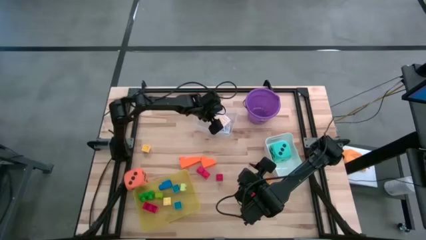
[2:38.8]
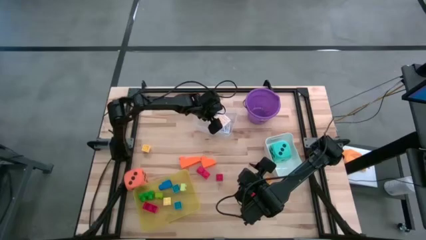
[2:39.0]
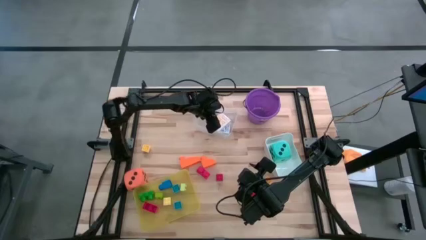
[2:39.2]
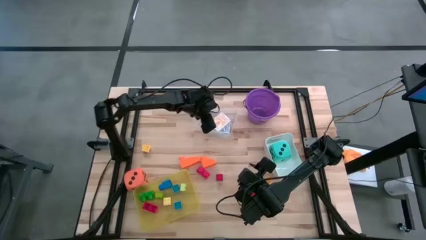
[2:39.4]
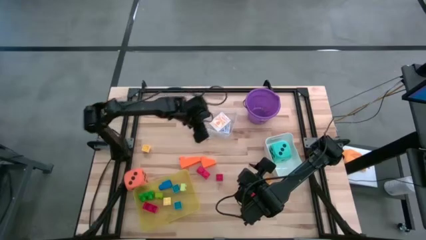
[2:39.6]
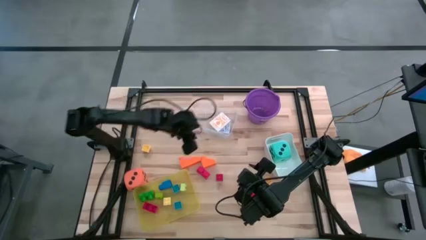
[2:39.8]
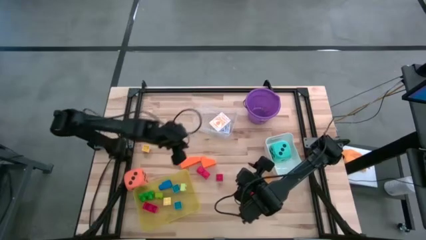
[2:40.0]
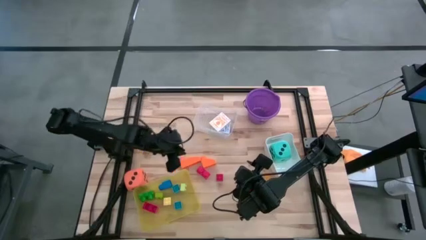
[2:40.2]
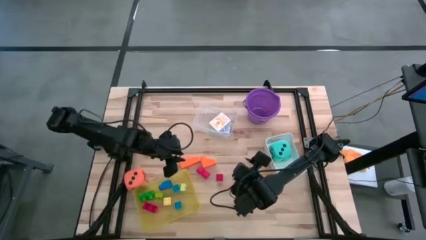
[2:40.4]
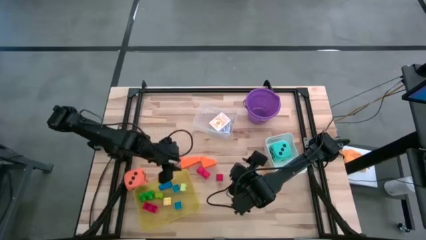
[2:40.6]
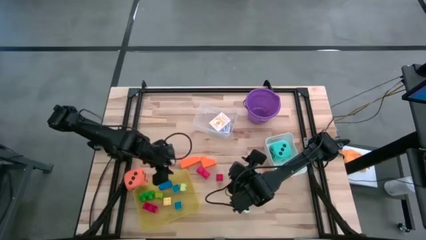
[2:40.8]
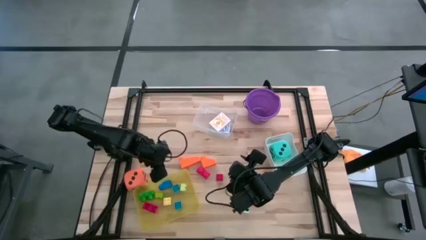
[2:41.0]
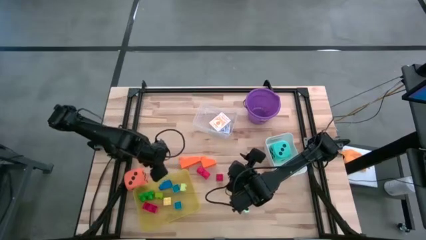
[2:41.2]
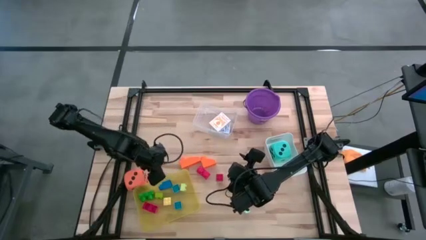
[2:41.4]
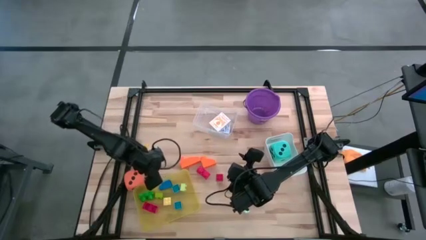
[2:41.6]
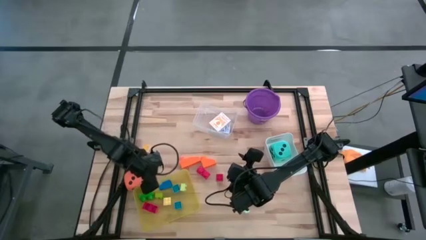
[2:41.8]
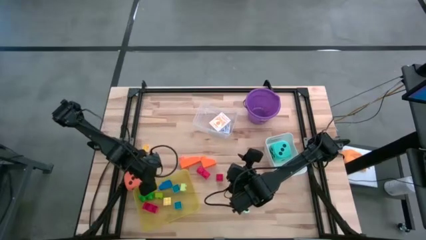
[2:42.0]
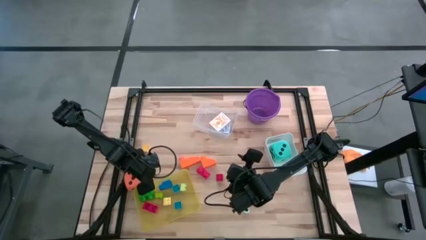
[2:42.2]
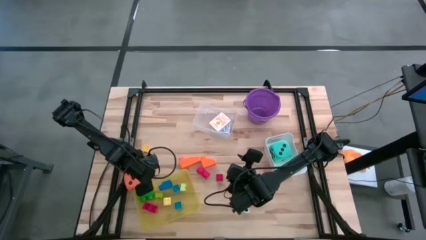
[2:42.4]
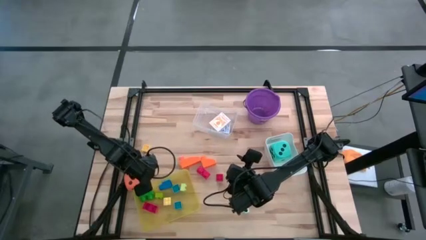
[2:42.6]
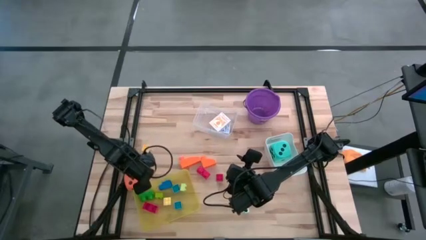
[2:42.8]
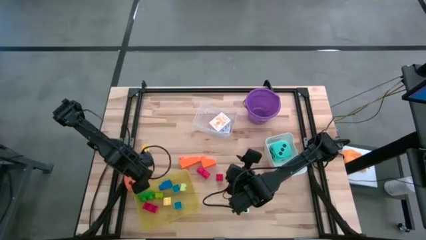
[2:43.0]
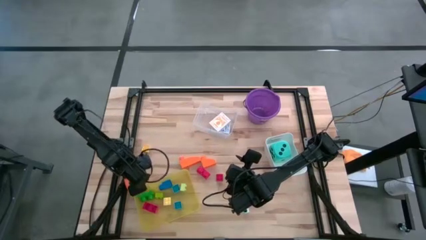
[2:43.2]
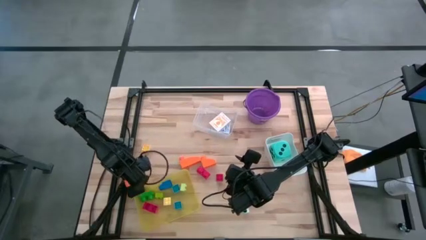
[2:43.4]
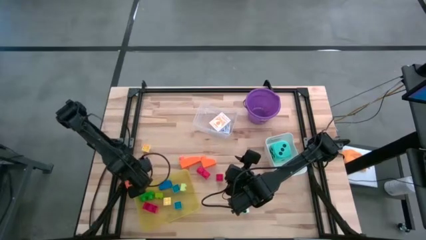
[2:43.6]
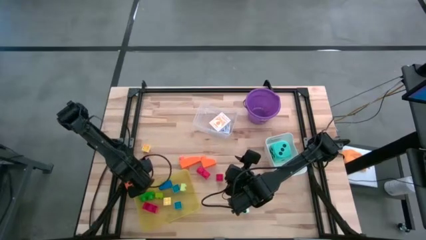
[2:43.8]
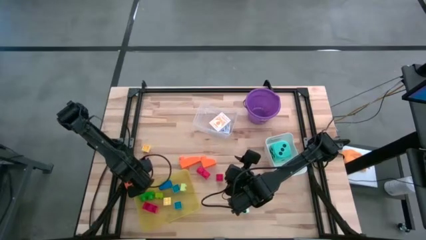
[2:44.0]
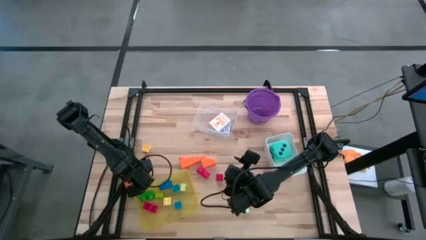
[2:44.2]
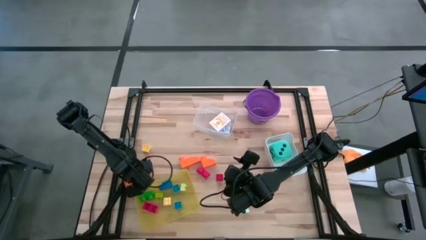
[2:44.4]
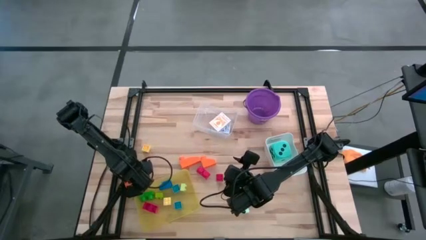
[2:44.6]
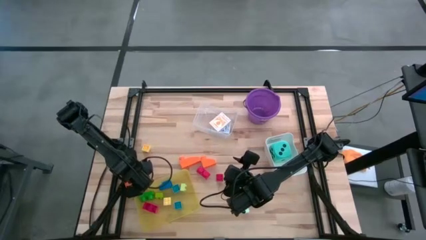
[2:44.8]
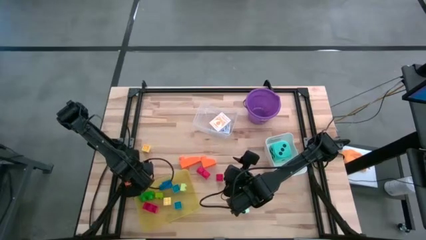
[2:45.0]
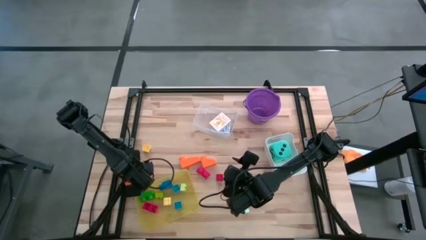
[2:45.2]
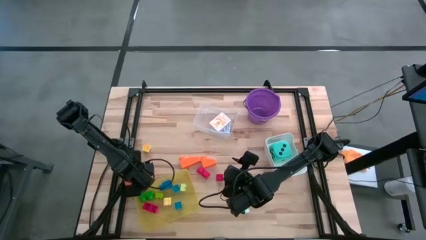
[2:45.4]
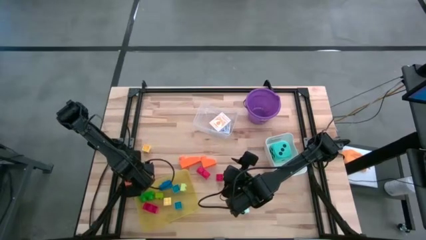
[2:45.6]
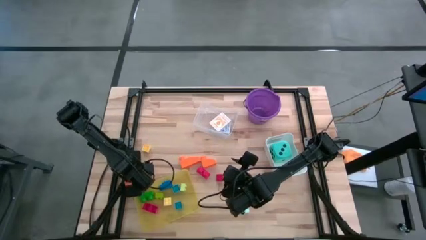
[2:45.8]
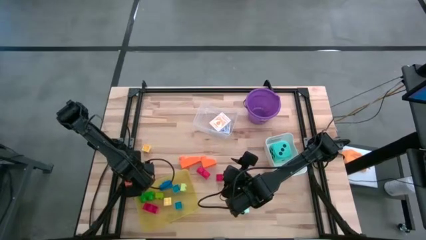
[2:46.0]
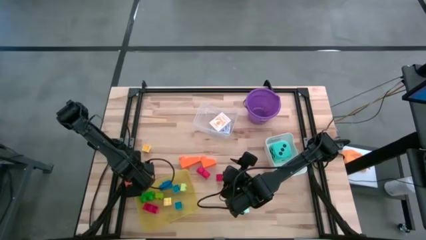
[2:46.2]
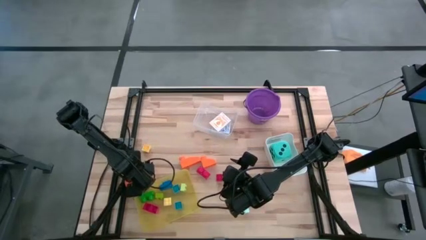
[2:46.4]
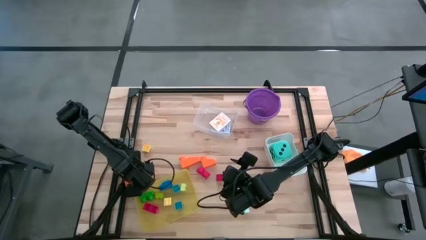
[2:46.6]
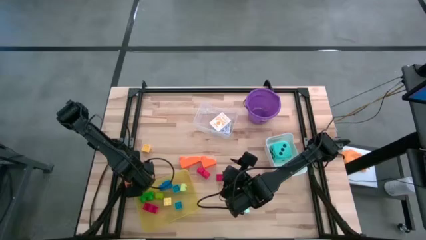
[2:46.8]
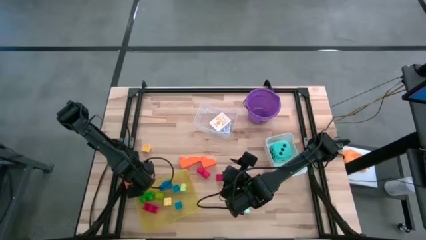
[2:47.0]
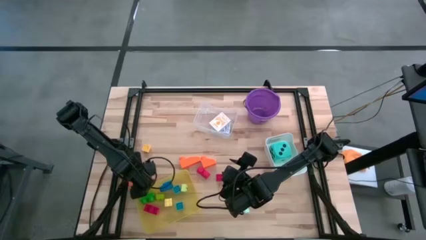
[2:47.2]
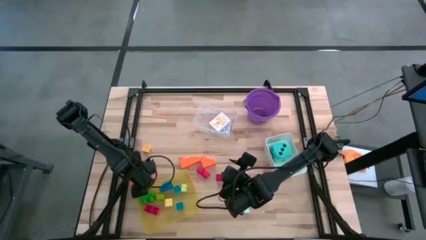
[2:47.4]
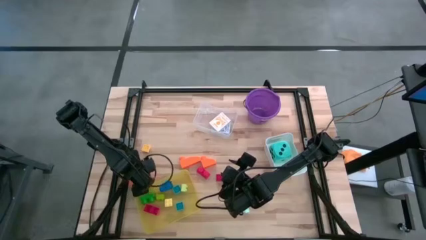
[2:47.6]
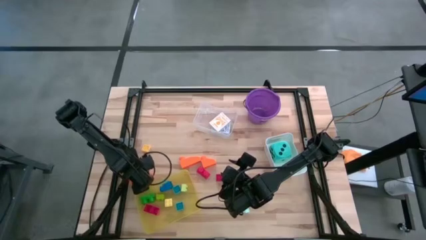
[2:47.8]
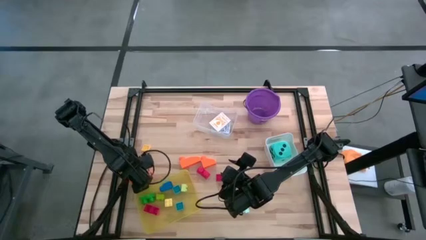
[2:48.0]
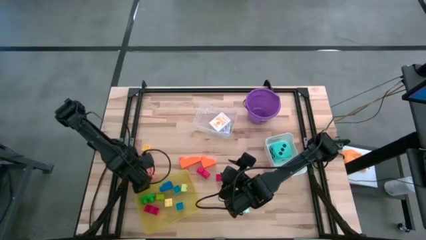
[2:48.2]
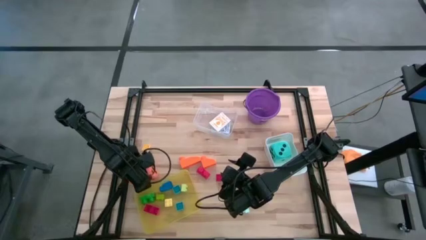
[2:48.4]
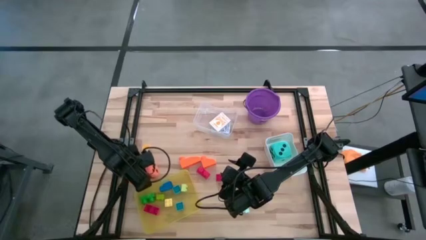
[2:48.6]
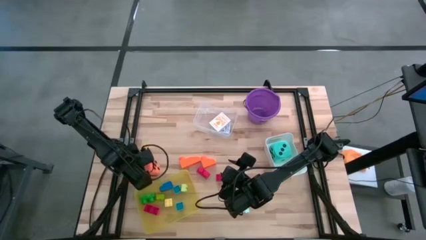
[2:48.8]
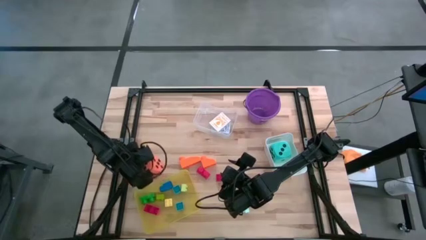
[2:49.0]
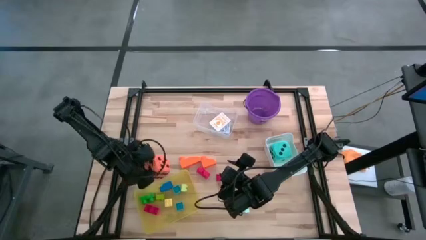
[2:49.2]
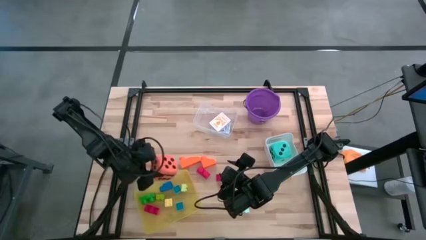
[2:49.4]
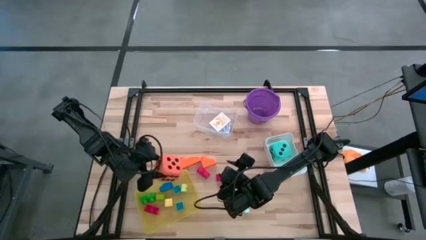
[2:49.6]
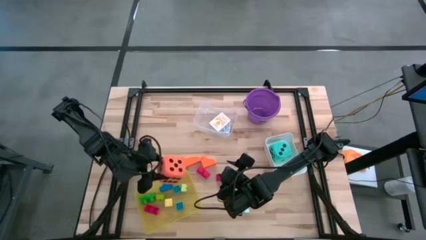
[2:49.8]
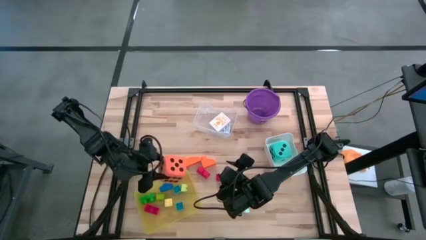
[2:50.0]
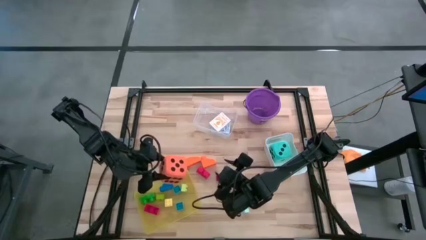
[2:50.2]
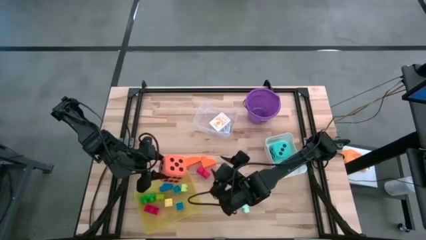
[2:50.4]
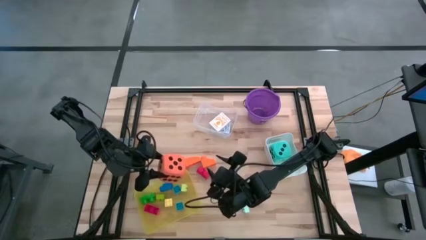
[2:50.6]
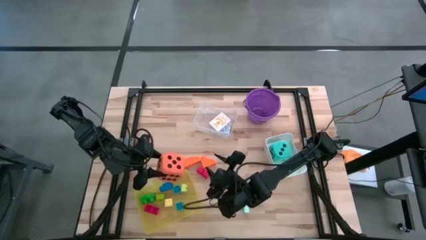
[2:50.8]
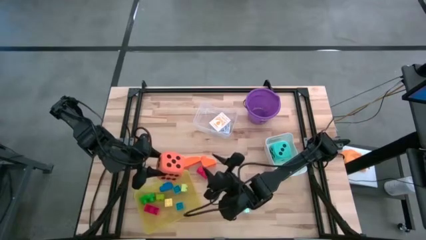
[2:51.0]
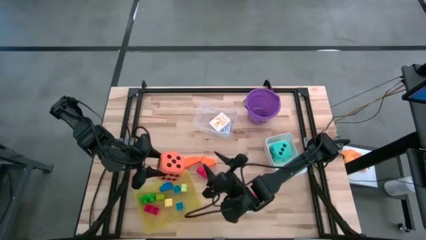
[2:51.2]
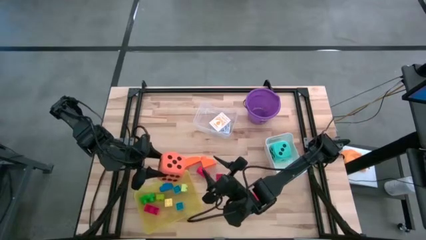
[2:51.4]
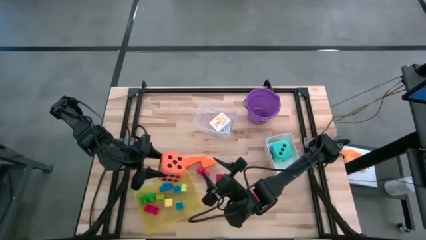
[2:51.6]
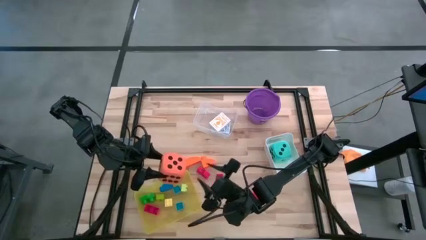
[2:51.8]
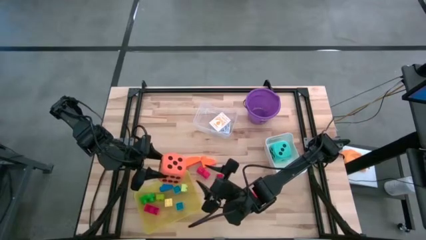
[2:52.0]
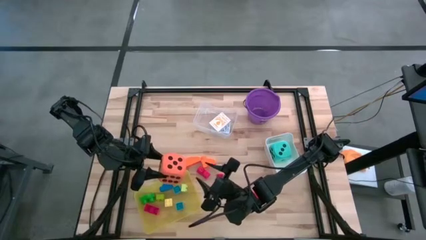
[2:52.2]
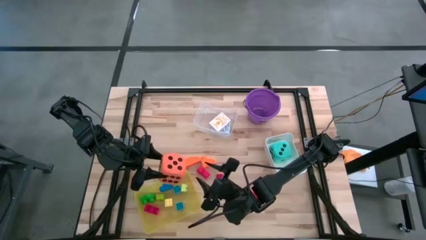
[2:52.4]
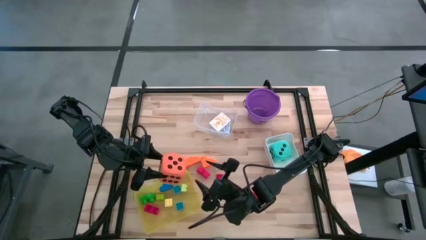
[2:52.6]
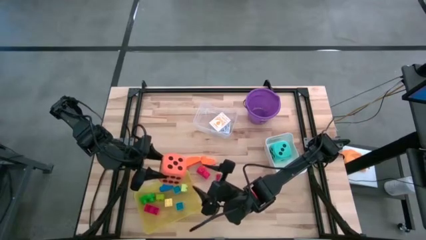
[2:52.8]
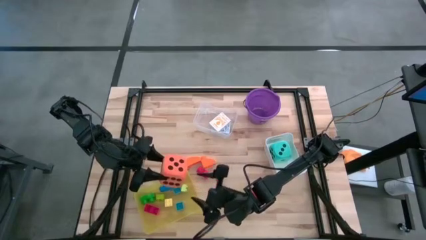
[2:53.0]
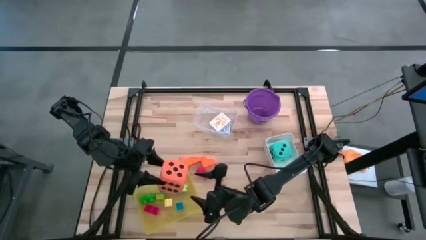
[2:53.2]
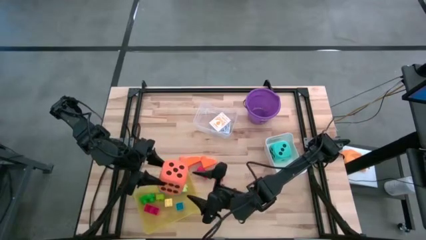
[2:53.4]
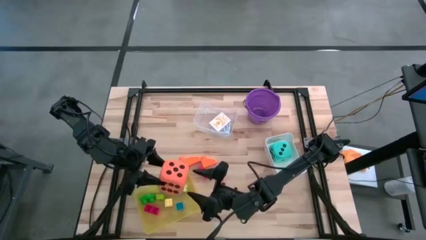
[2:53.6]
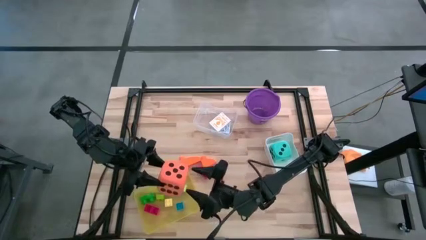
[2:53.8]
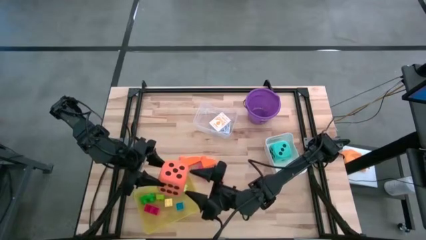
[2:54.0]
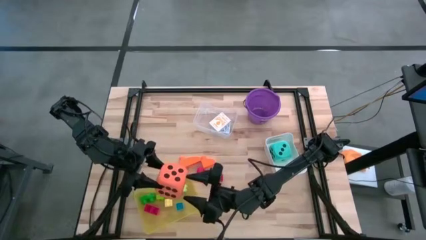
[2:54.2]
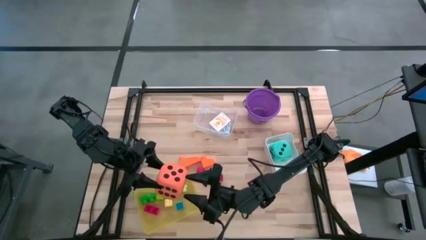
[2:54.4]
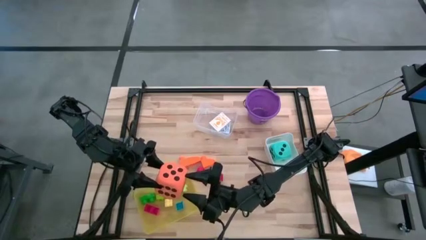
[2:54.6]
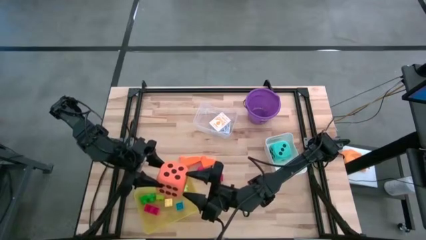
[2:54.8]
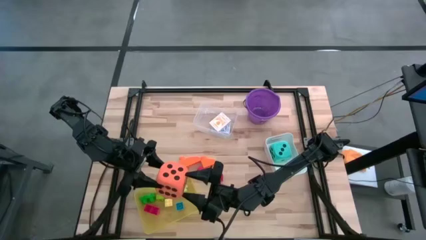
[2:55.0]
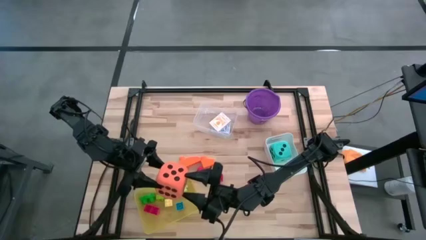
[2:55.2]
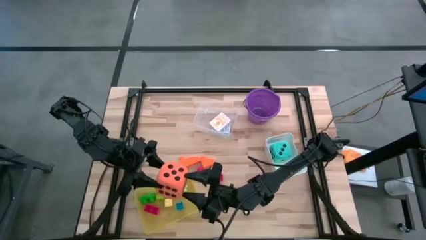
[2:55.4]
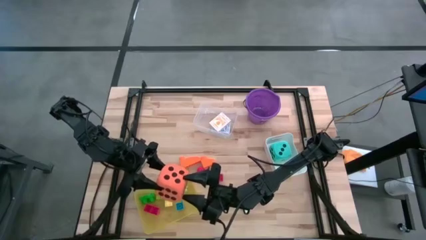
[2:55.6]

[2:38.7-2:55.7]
Task: Pick & Place Toys
Put the orange dice into the white bin
